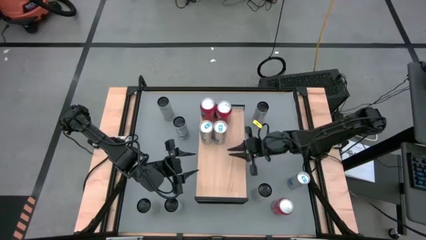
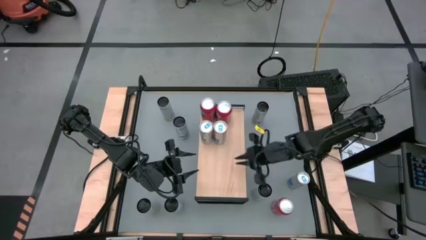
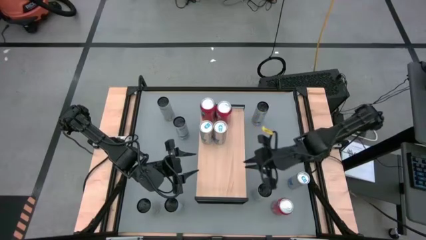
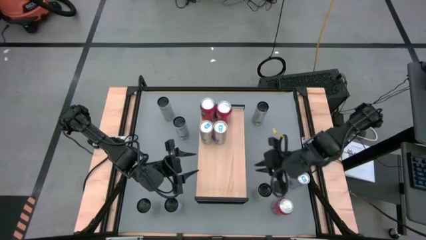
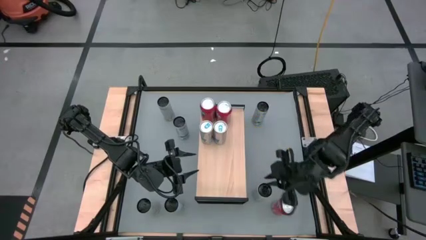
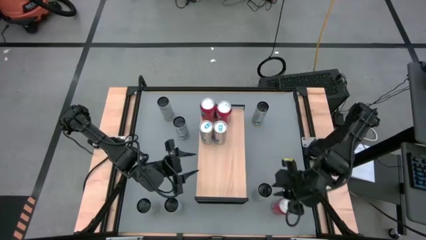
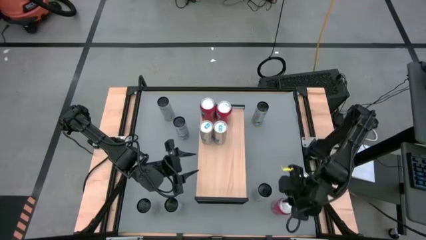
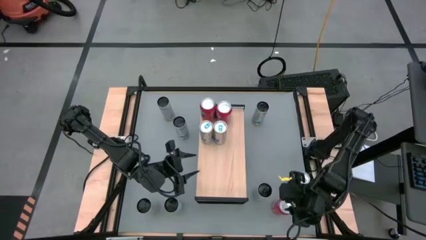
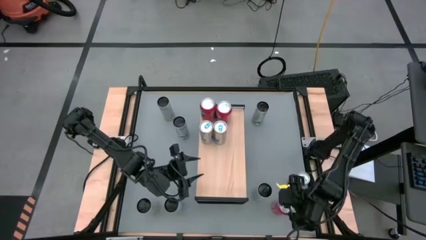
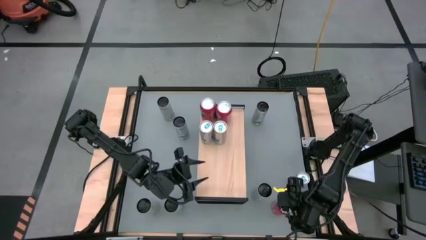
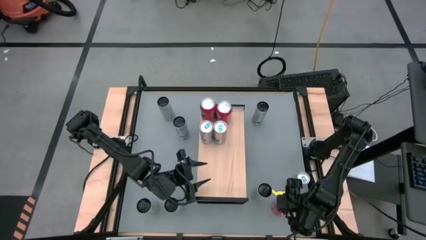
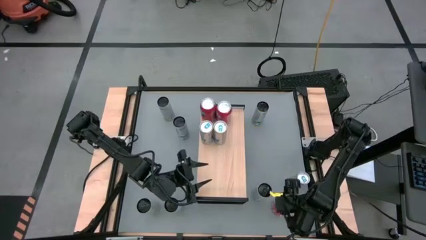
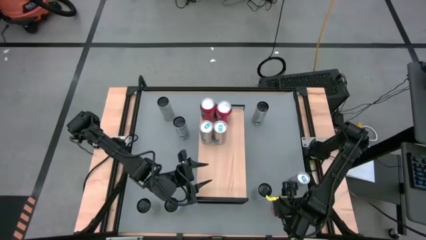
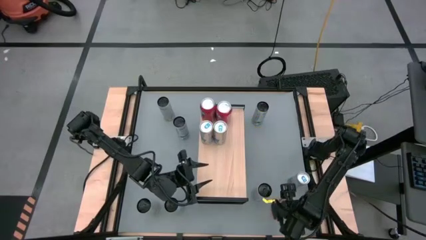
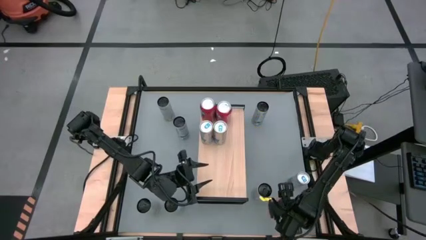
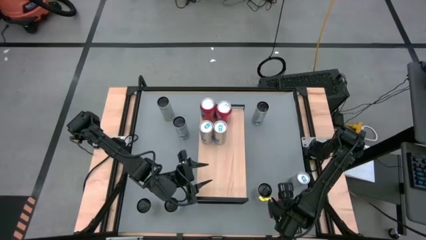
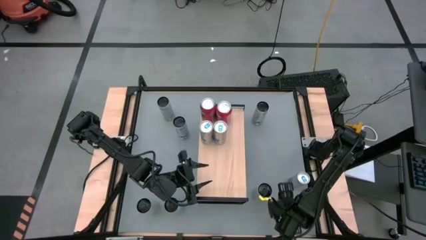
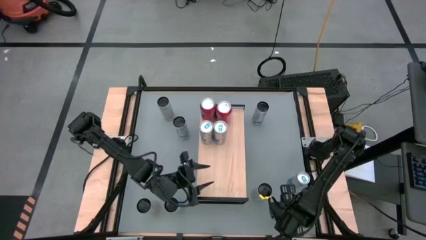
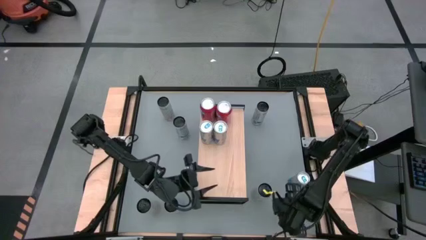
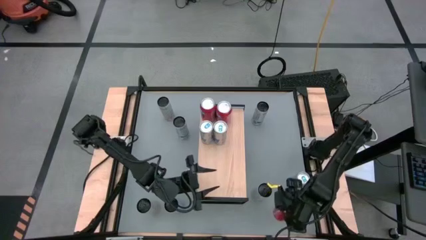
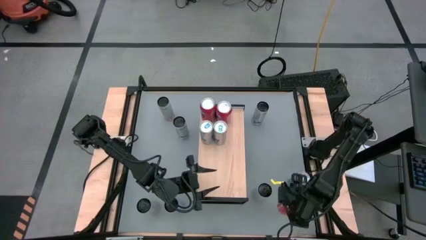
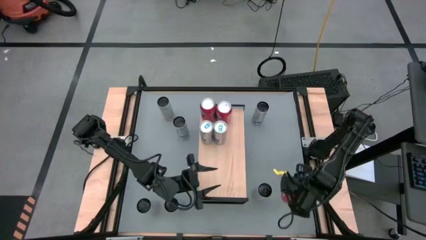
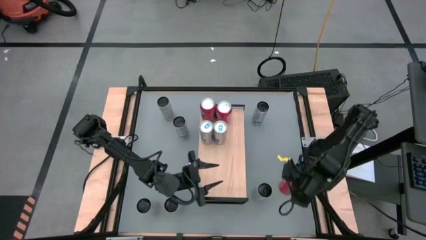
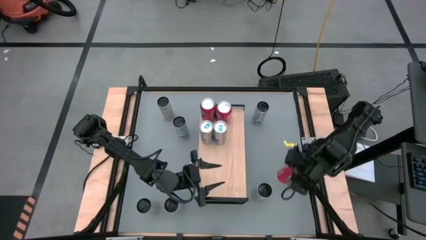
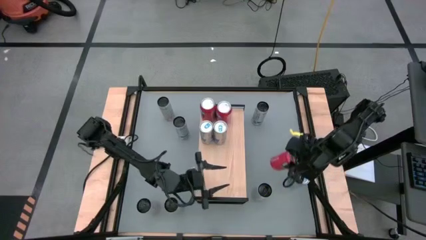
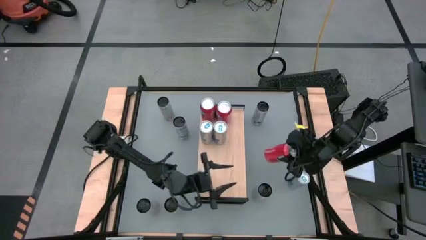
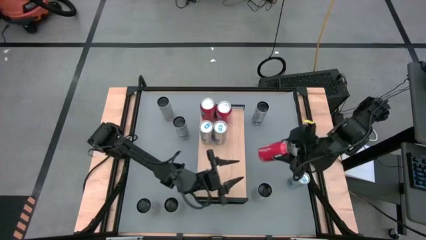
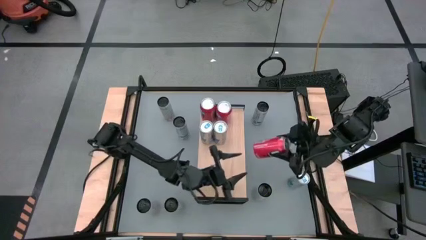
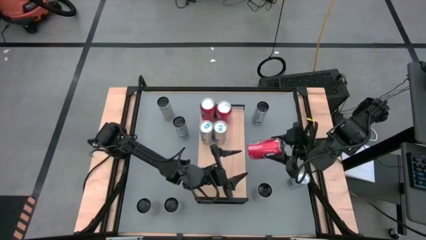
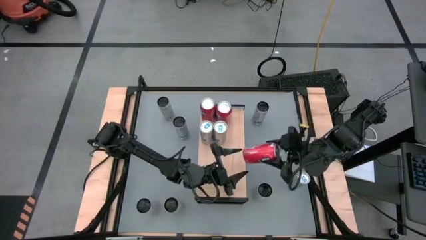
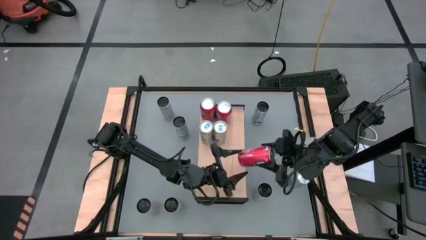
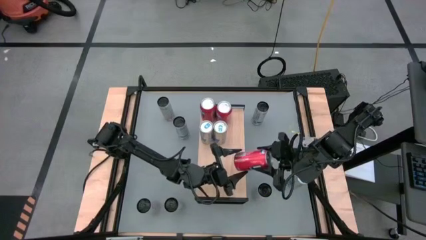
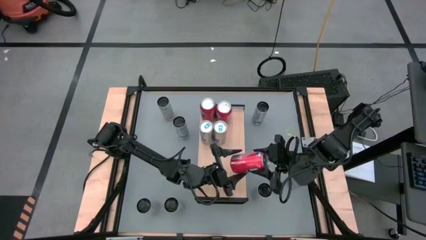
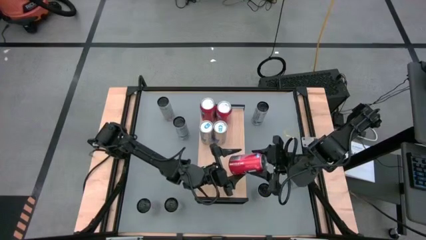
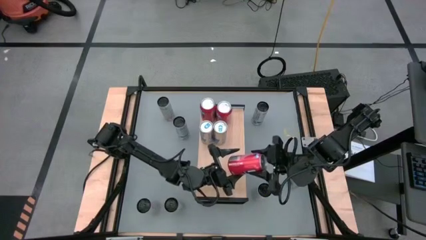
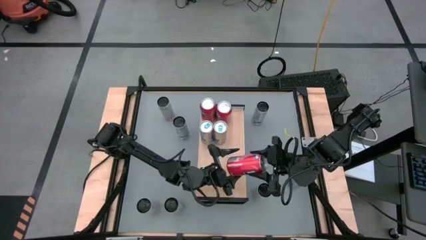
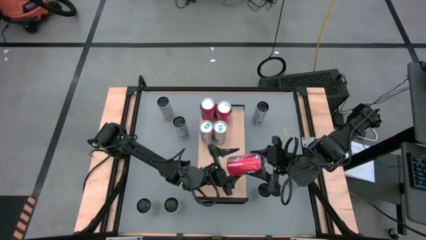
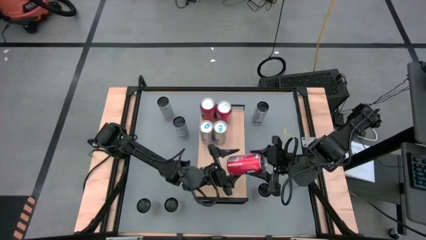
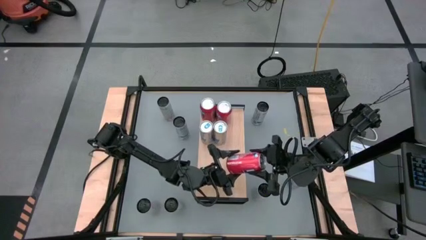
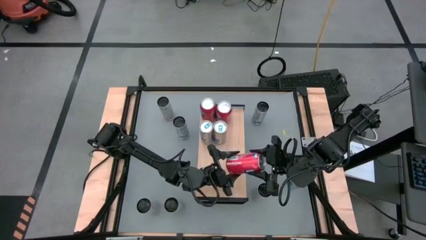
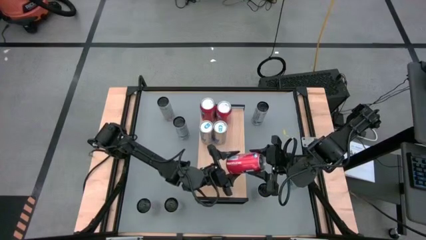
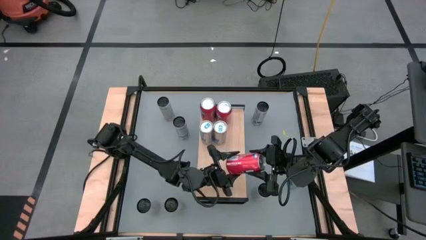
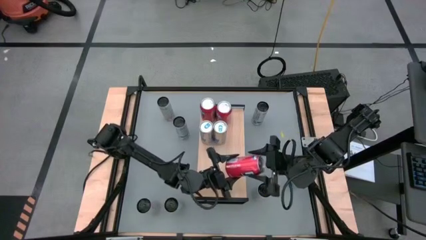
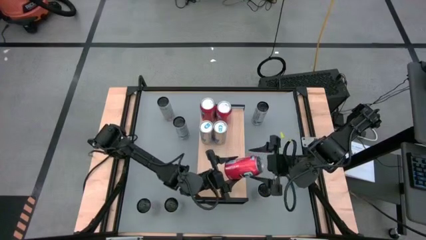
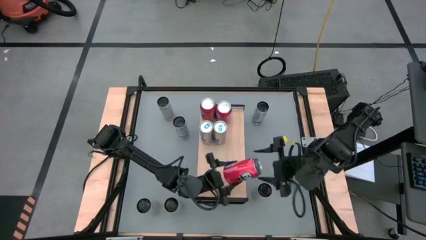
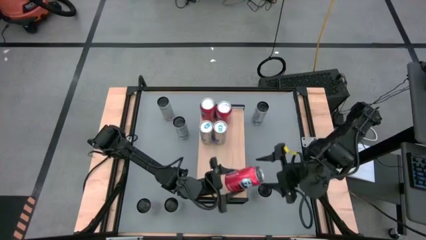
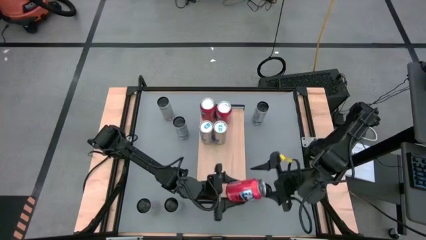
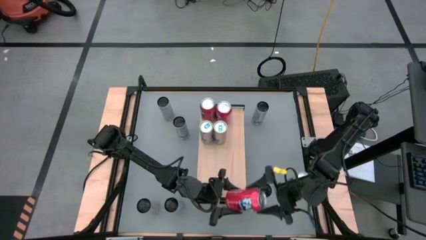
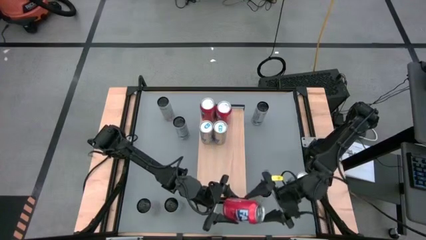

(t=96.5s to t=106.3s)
Task: Place canned beverage on shelf
Put the orange soda can on the shelf

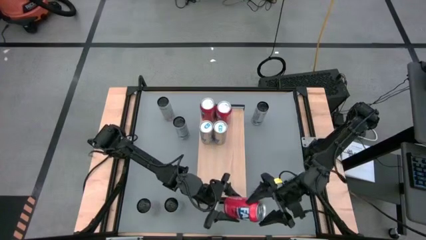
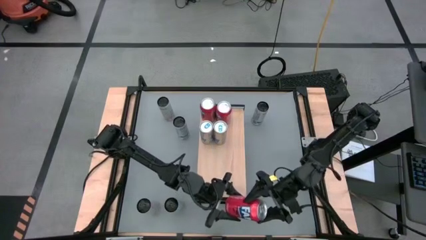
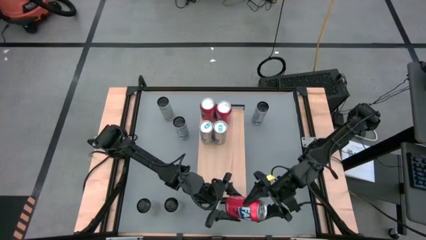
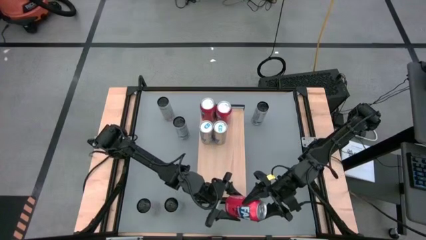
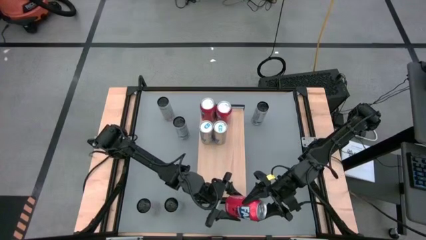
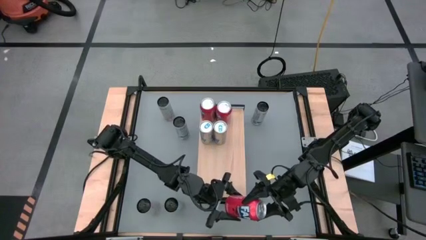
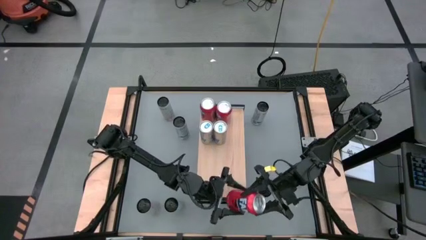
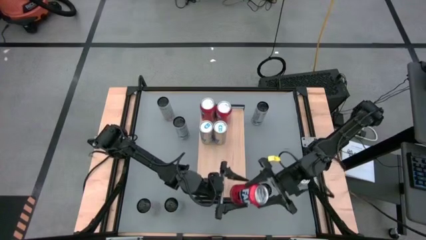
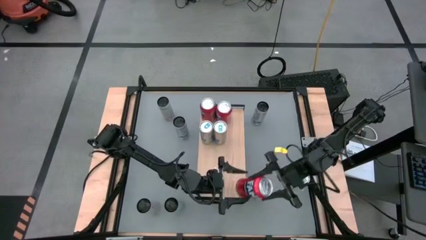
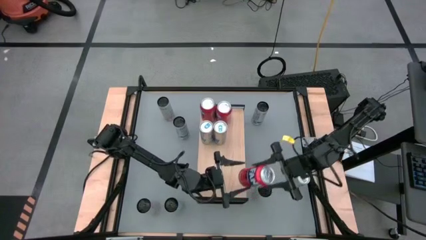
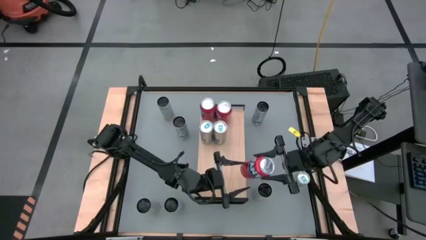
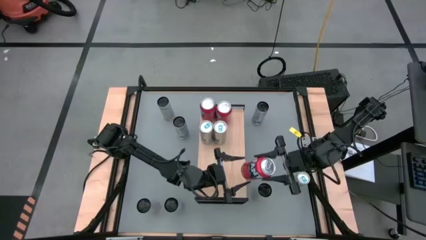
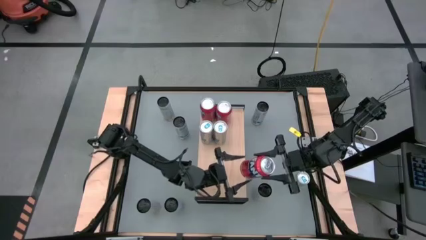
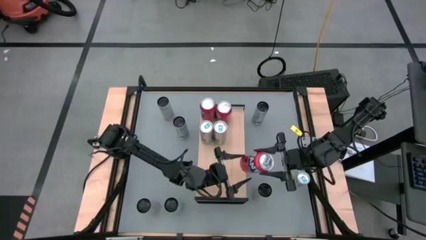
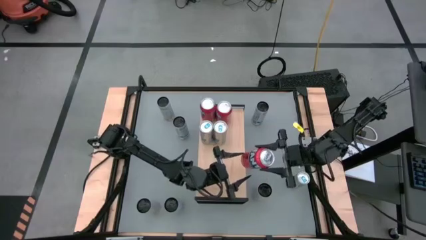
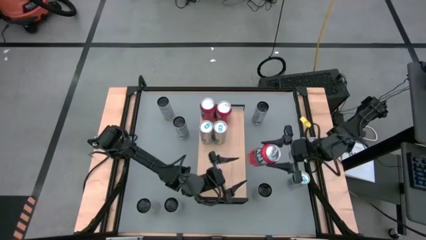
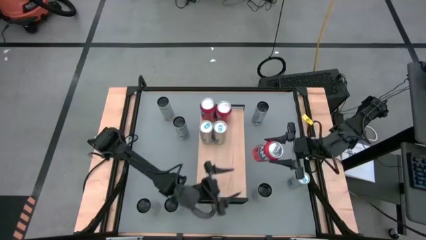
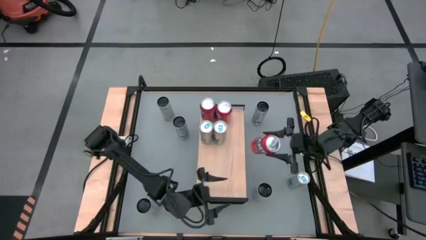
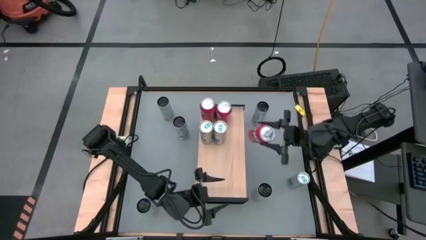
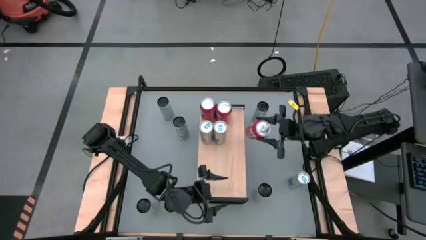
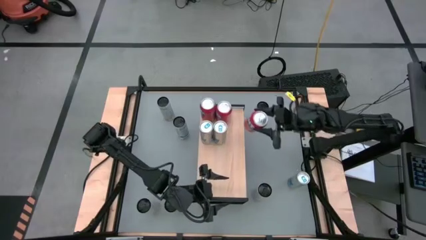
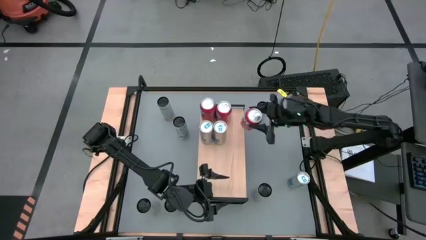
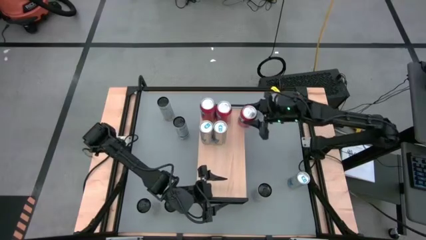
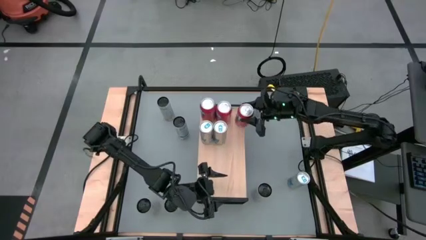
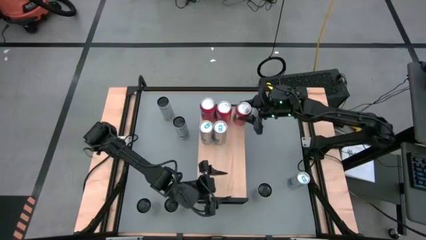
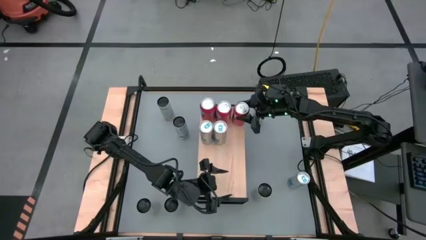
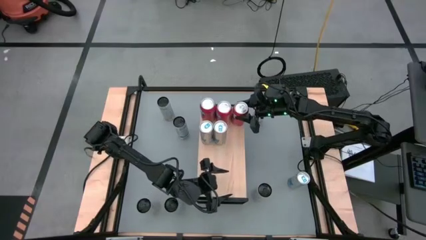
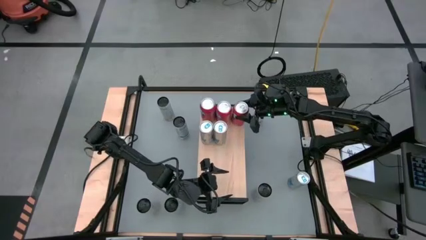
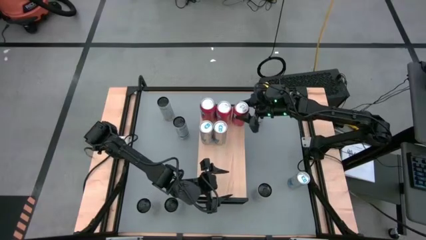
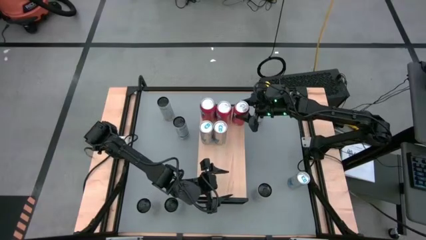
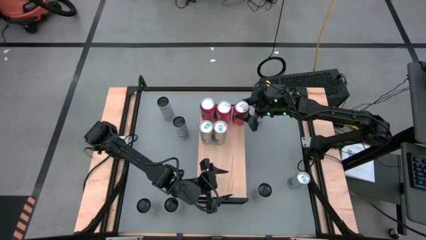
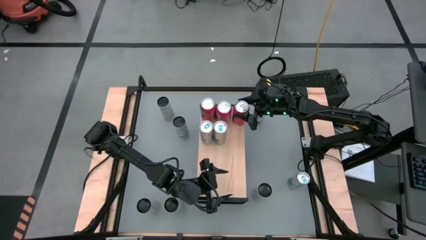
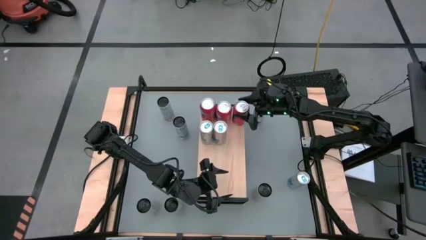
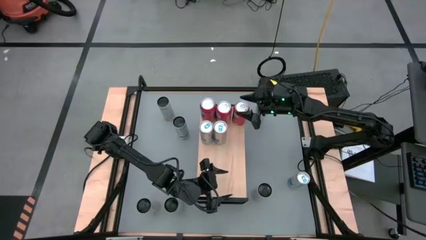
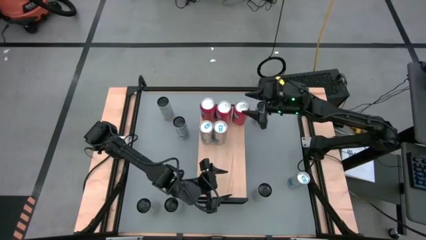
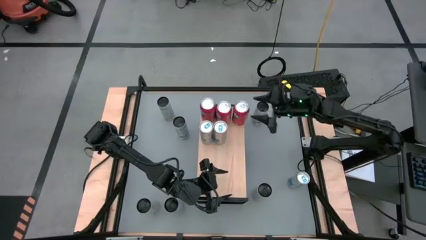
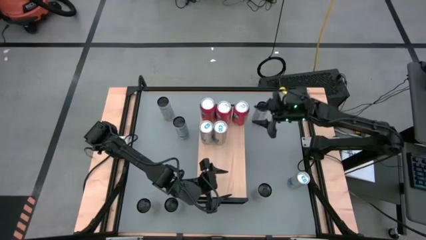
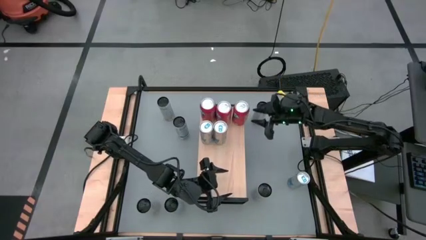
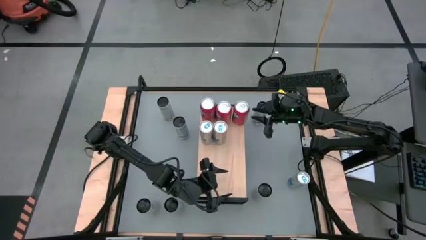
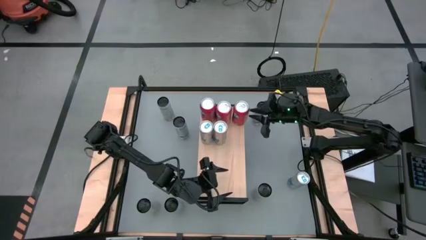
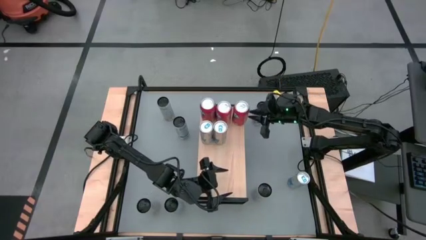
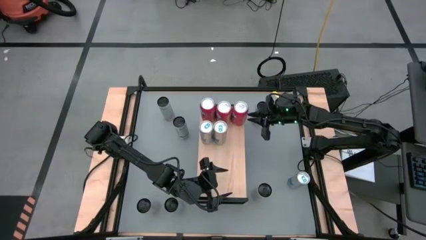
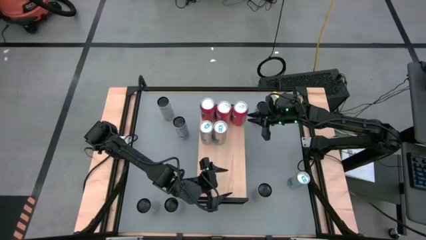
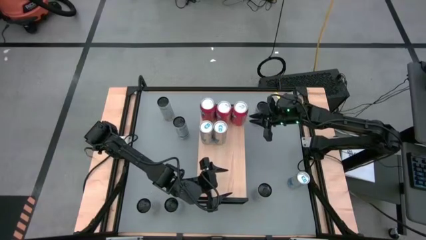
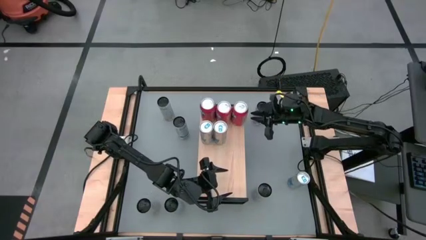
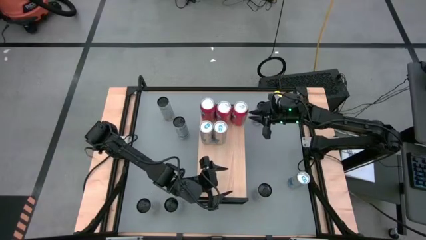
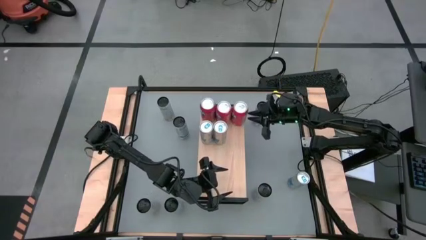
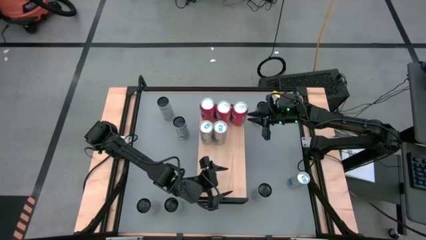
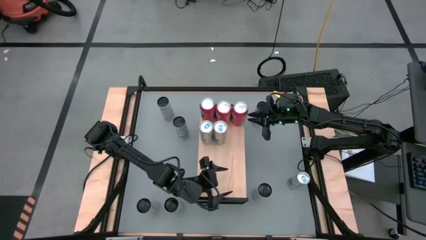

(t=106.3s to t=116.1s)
Put the orange soda can on the shelf
